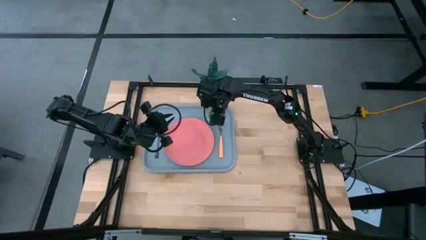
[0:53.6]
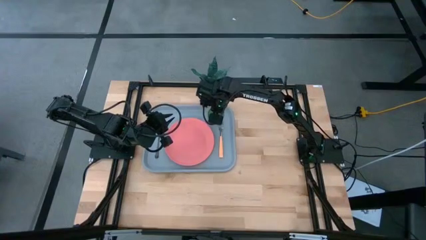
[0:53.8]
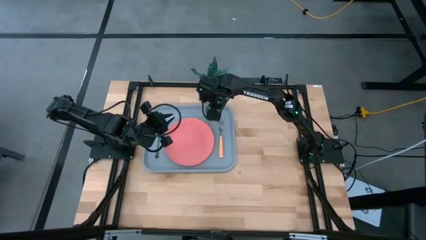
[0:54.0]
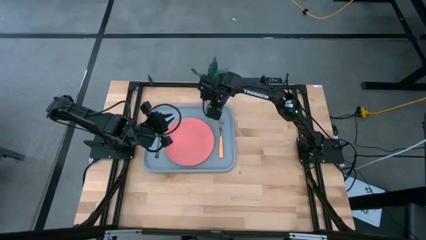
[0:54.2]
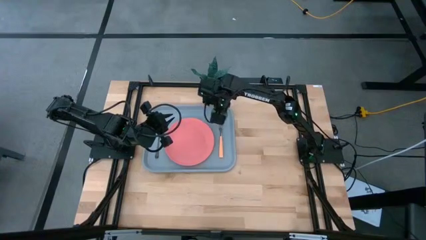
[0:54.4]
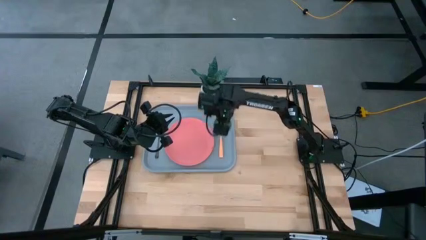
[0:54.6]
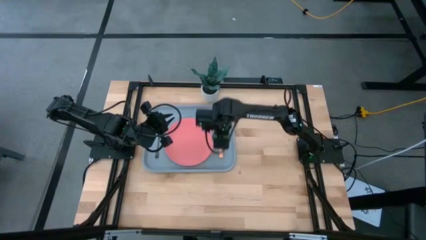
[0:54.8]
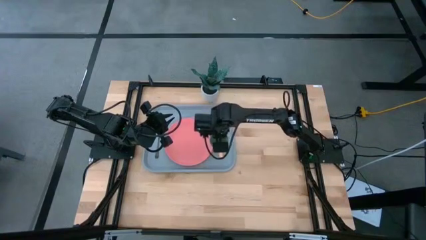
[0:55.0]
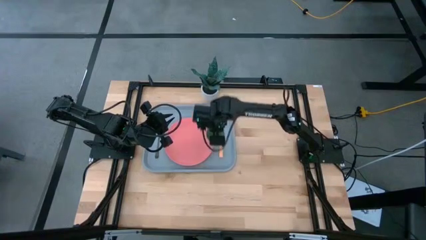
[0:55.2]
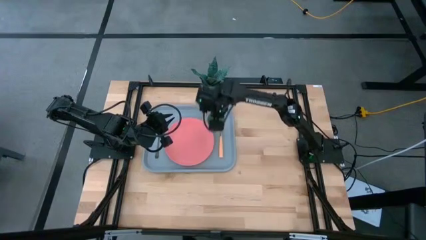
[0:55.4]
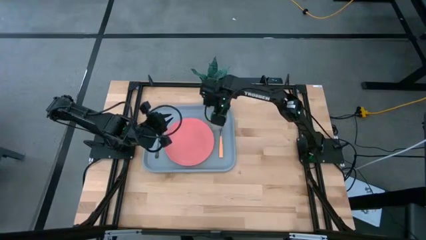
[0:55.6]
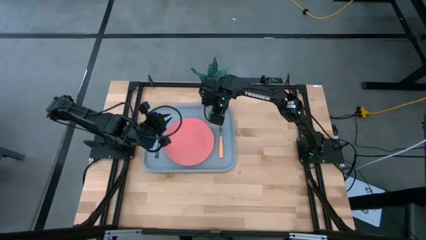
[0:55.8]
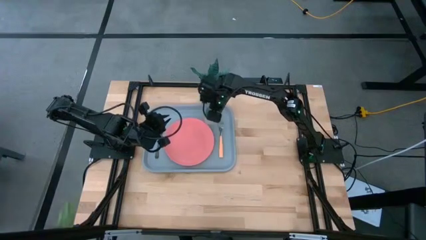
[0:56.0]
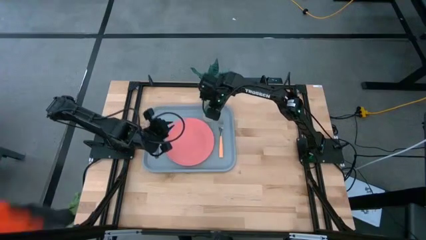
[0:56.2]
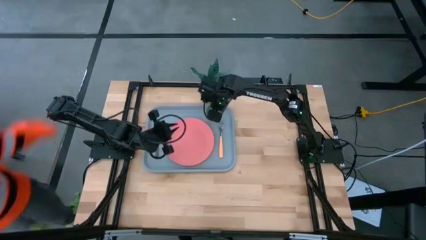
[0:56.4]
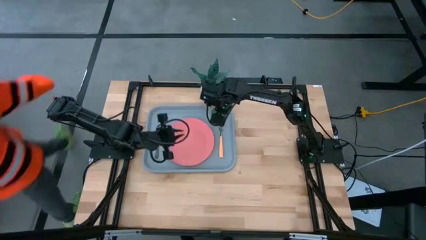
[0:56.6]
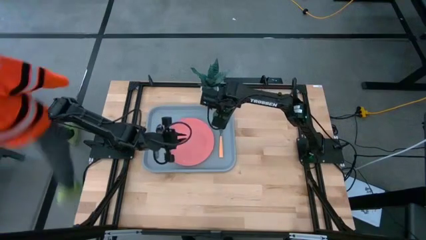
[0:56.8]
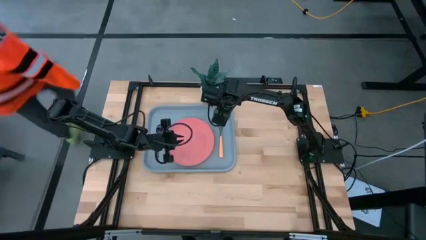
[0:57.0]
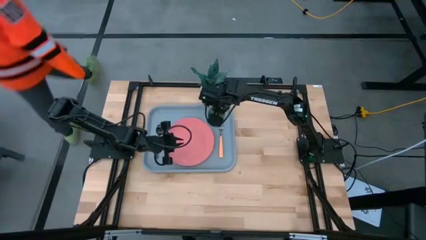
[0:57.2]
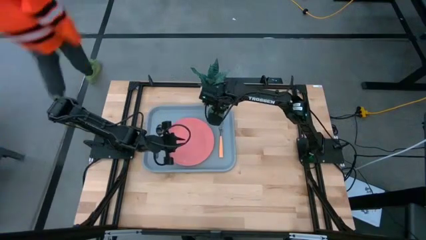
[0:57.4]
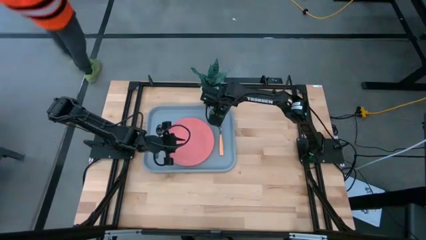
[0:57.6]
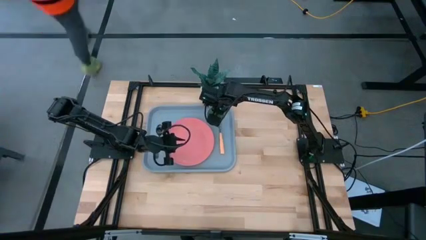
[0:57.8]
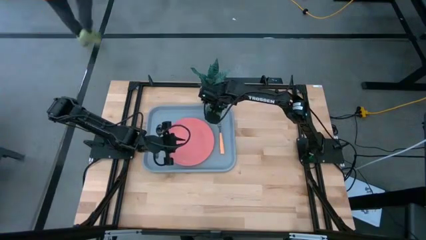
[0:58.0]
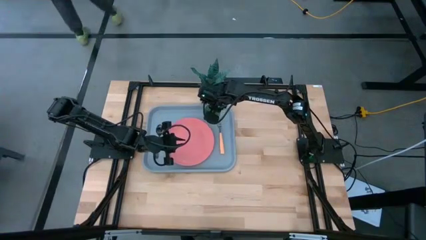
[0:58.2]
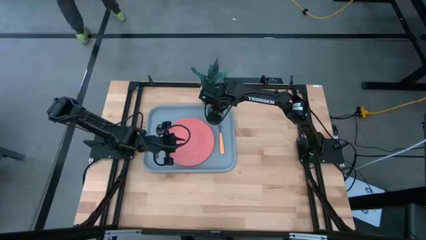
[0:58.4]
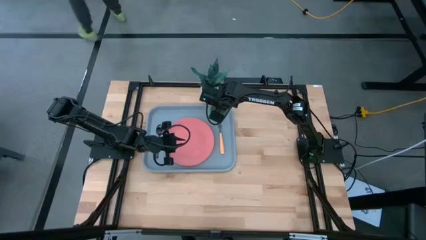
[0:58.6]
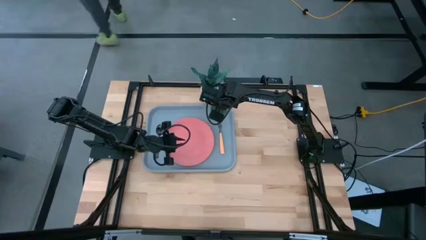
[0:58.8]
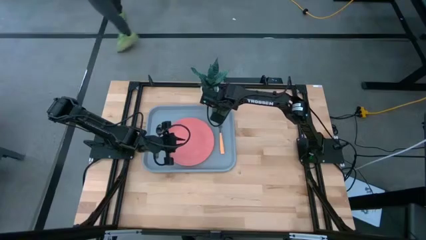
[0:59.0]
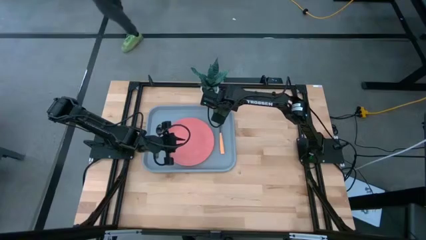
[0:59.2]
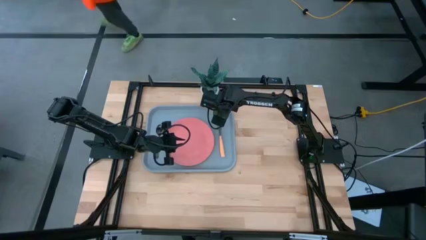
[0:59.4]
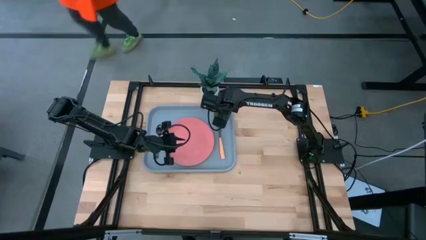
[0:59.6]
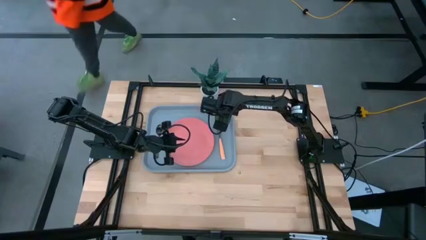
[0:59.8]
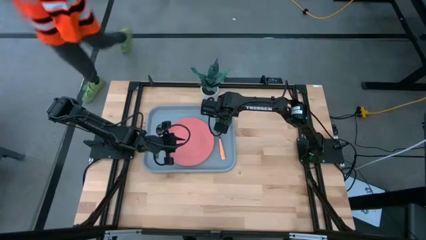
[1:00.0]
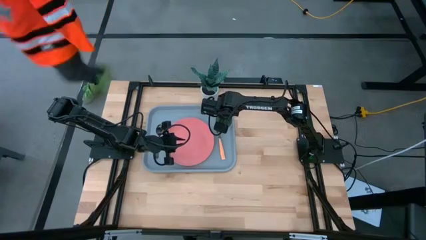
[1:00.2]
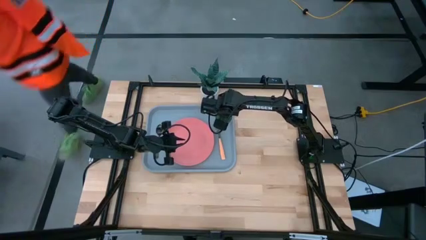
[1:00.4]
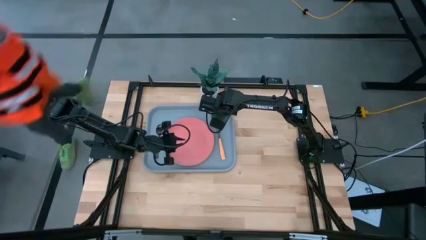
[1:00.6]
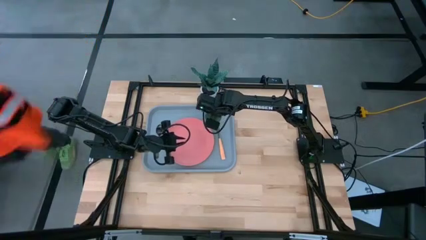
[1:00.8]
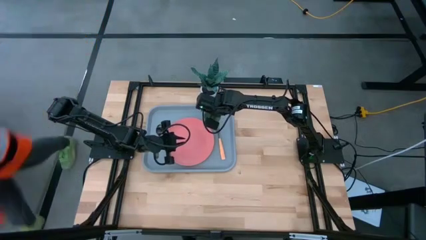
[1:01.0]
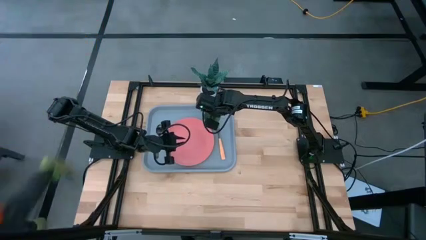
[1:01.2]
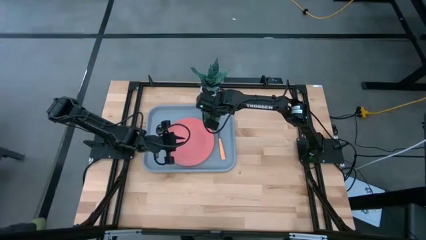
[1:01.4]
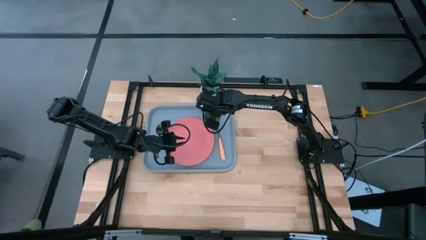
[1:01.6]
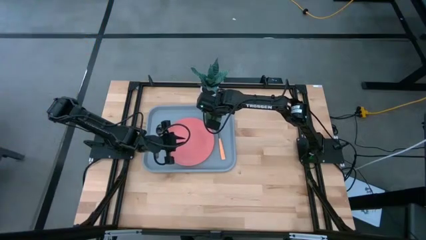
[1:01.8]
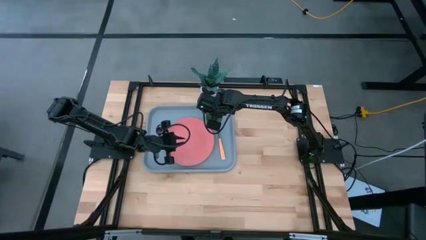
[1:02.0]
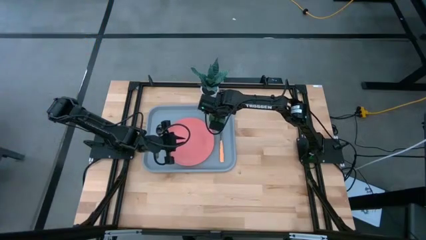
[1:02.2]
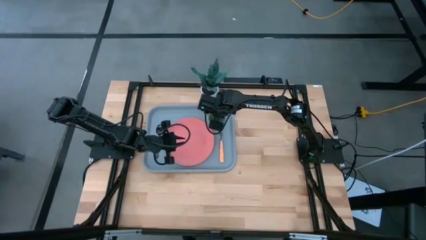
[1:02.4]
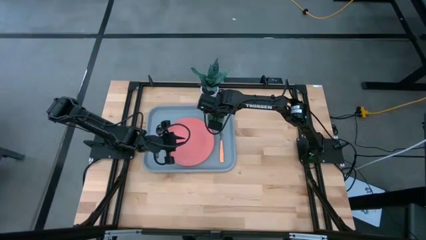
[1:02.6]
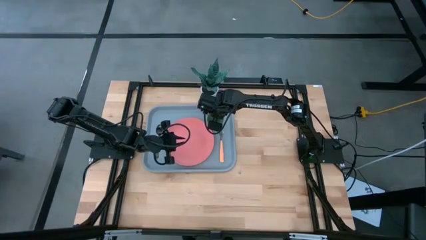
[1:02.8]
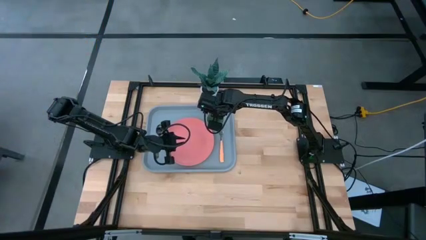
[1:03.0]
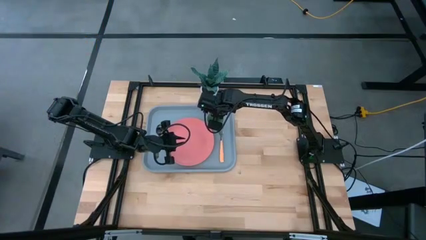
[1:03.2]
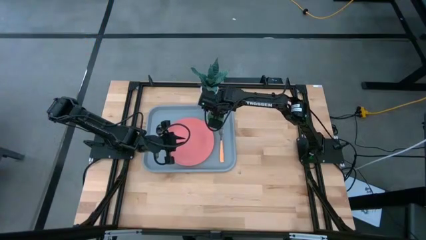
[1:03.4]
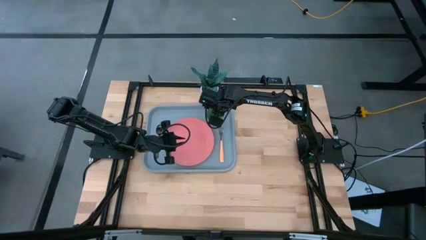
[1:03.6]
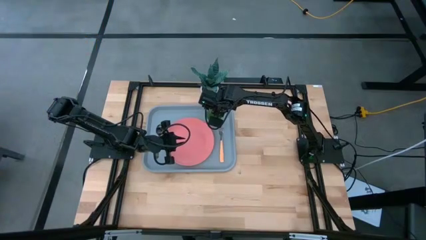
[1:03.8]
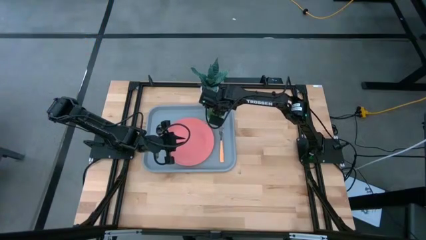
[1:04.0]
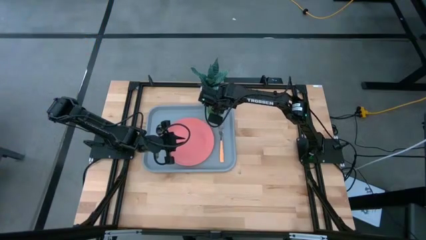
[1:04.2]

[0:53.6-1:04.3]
Task: Pick and place plate/cup/fork/spoon on tray
Put the green cup on the blue tray above the plate

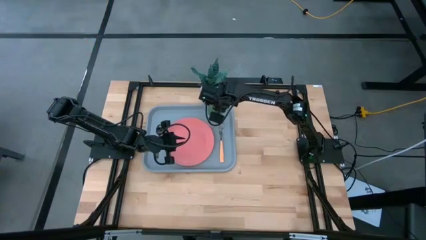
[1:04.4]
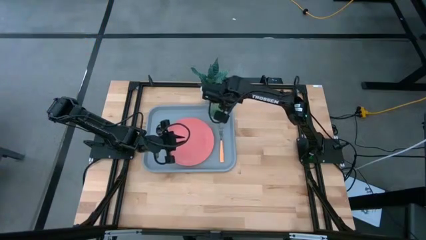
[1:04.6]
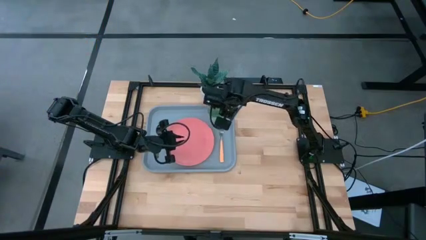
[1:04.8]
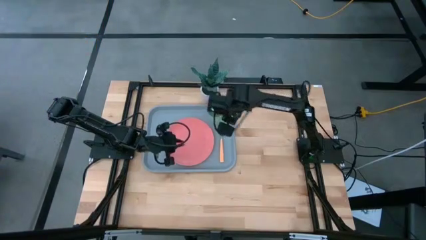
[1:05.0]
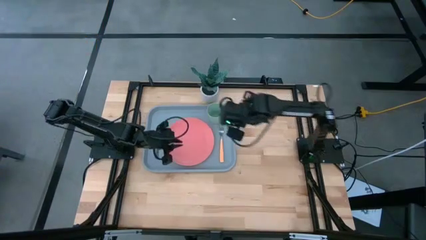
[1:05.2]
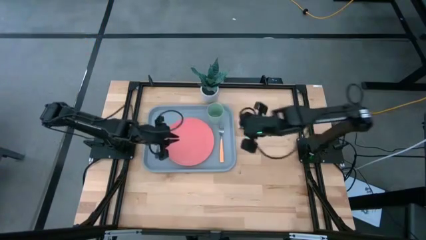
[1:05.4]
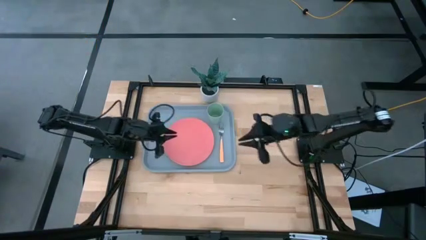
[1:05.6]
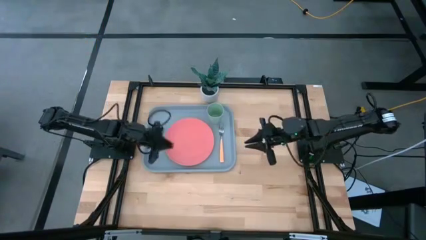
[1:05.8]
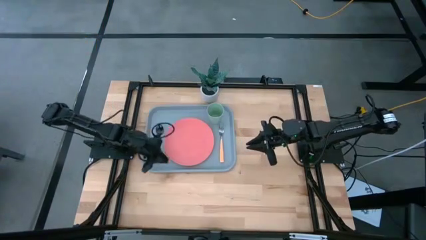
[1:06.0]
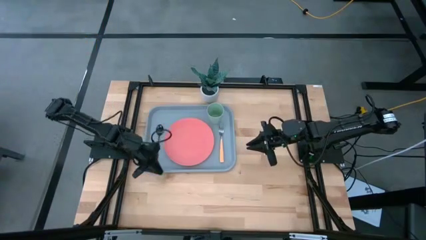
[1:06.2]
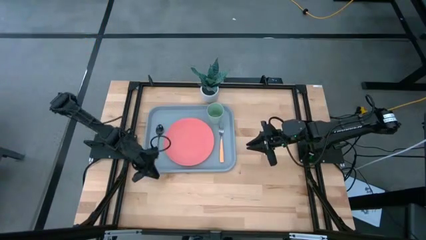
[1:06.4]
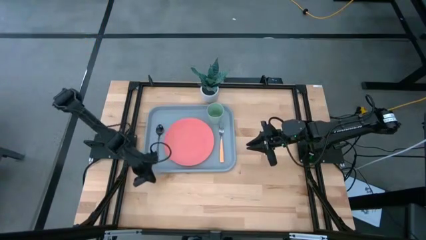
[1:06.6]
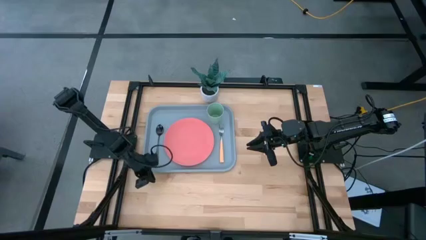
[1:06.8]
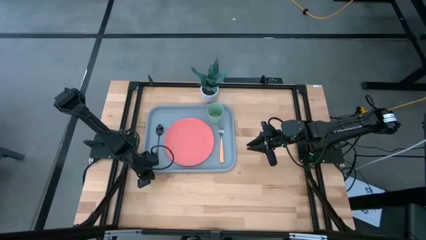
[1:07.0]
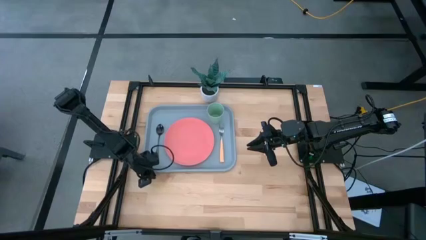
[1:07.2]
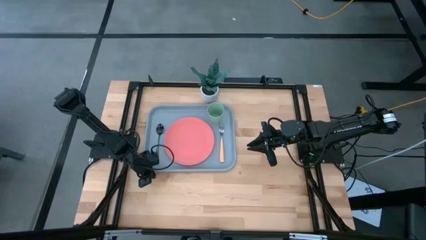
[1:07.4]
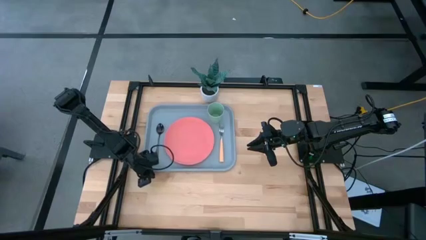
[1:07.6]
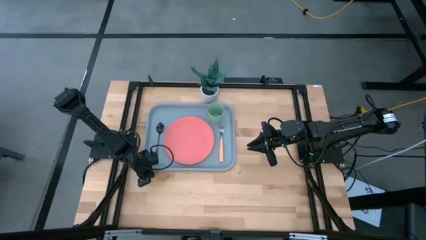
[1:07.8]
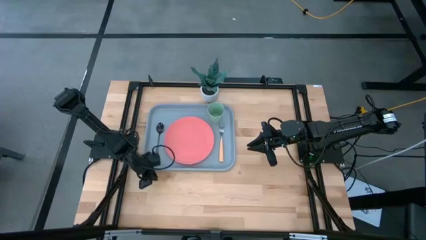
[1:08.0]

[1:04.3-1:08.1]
Adjust the blue tray

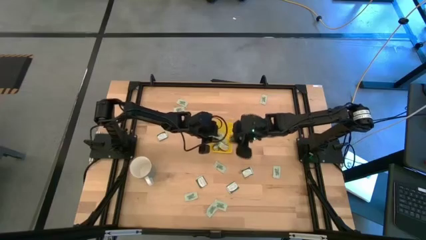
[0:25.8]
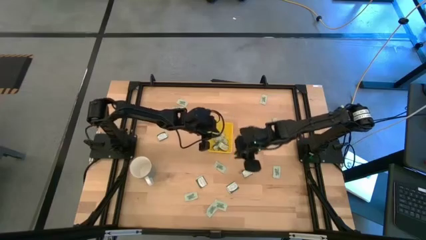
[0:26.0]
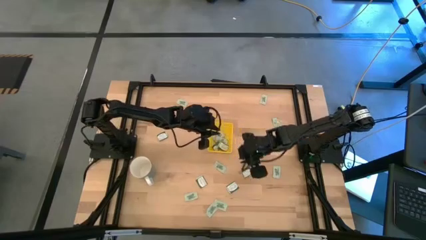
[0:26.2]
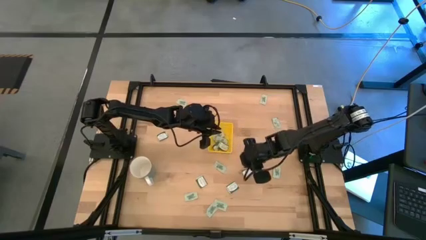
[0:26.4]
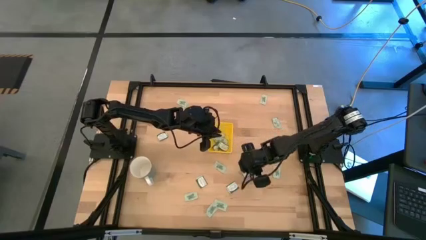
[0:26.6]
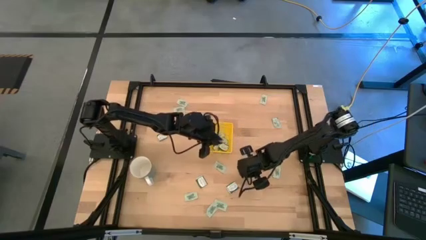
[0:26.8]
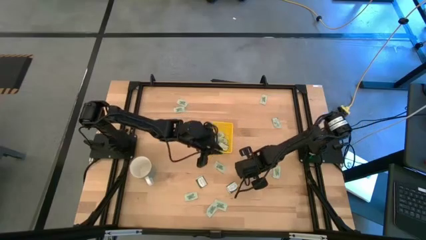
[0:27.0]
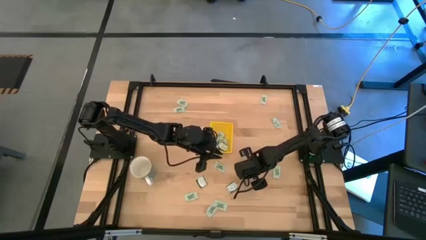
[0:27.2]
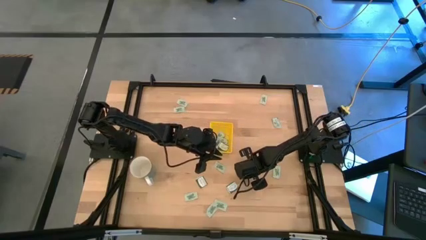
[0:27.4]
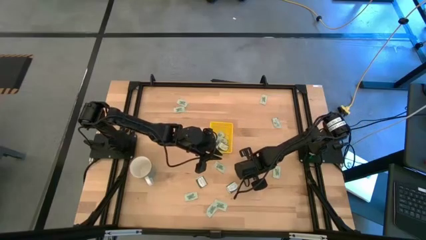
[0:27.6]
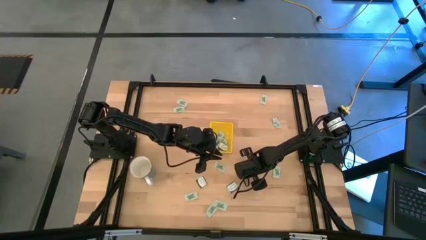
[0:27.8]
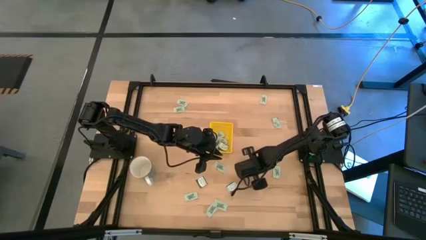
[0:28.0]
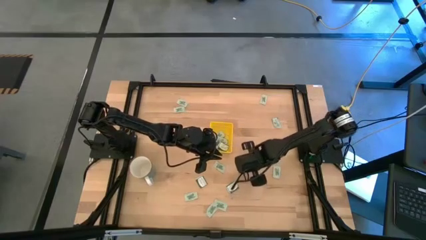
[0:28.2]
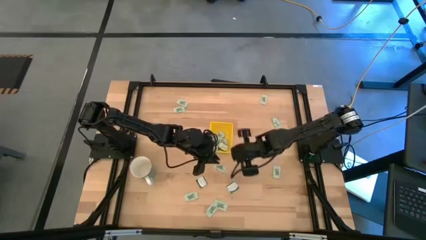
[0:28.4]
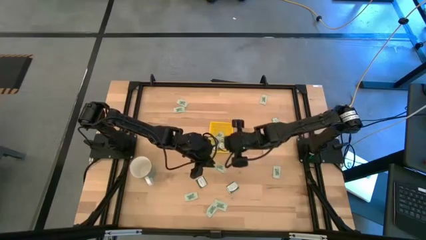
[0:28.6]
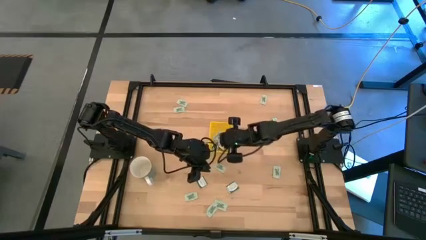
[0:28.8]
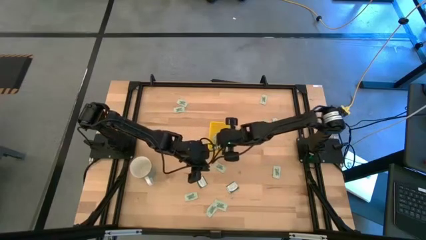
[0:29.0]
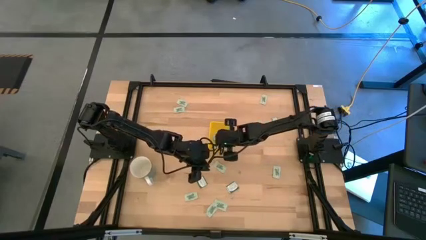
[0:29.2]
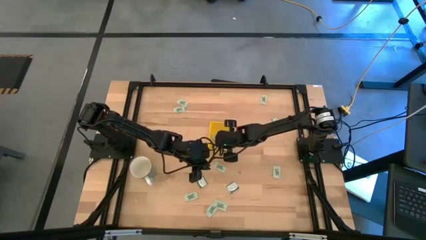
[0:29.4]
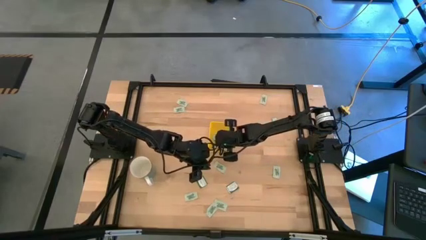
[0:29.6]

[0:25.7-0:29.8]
Task: Pick and place Stevia / Truvia into bins
Put the green stevia packet into the yellow bin
